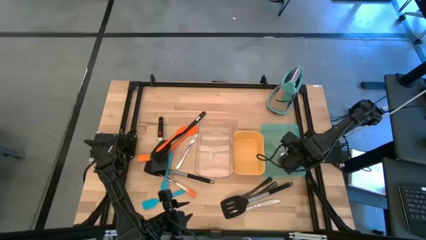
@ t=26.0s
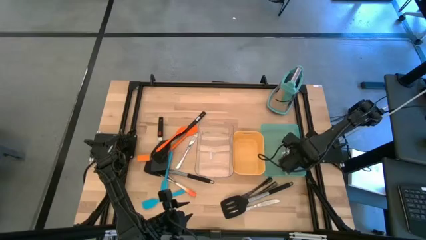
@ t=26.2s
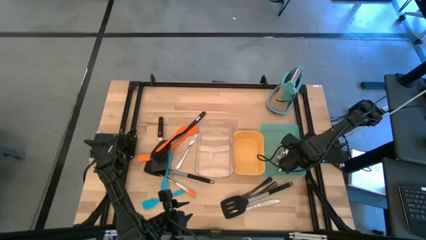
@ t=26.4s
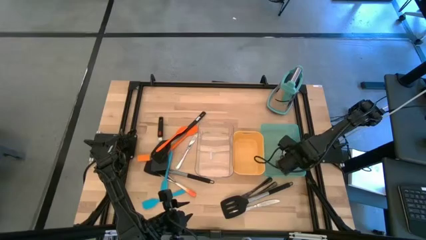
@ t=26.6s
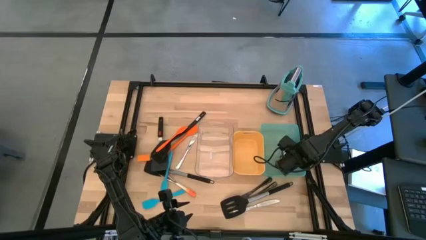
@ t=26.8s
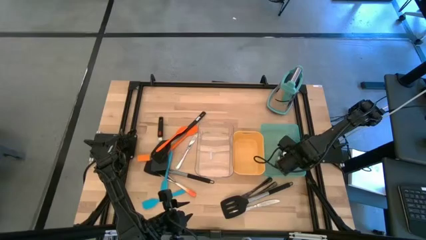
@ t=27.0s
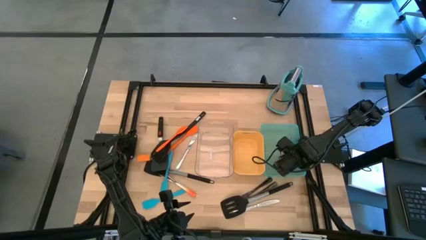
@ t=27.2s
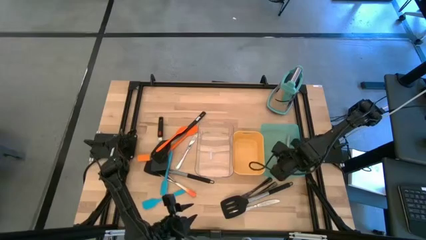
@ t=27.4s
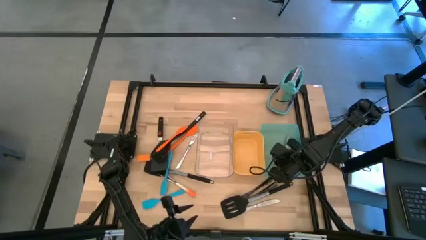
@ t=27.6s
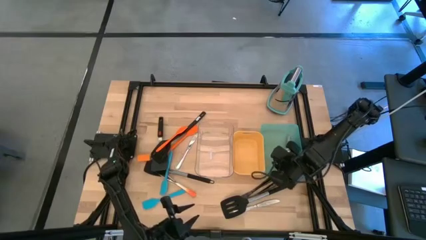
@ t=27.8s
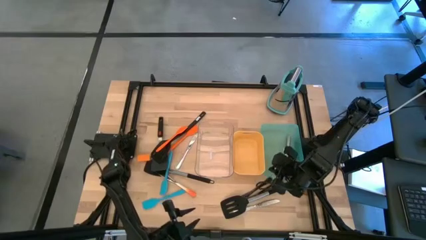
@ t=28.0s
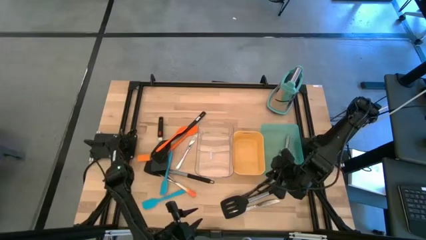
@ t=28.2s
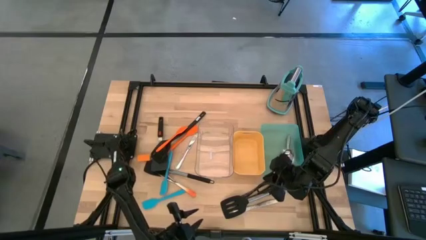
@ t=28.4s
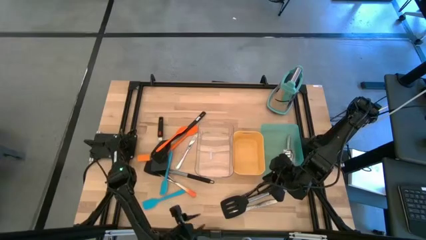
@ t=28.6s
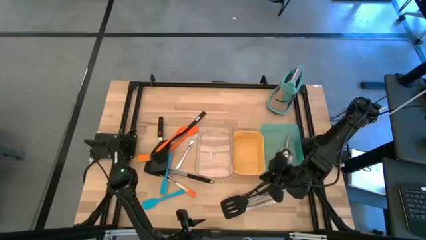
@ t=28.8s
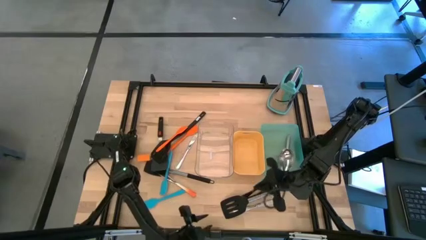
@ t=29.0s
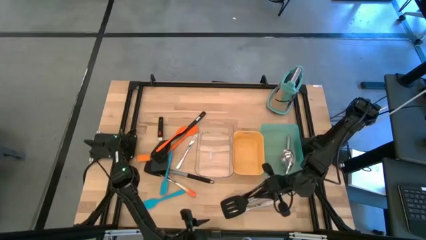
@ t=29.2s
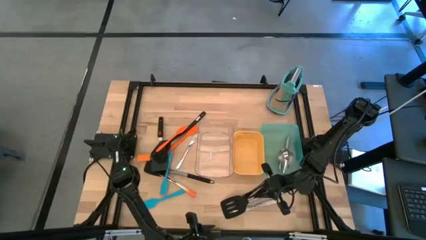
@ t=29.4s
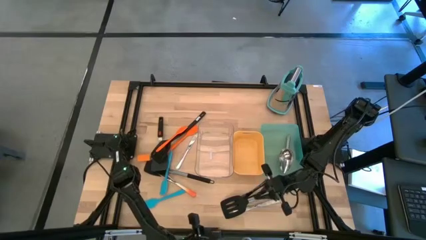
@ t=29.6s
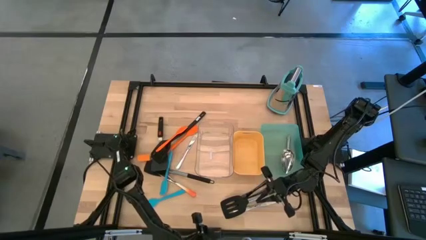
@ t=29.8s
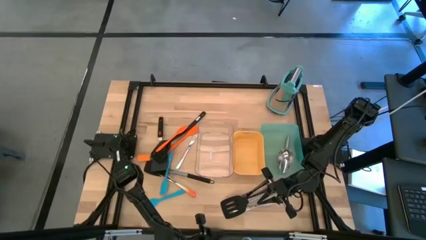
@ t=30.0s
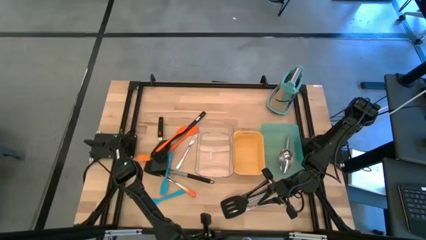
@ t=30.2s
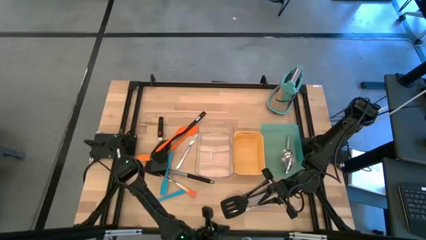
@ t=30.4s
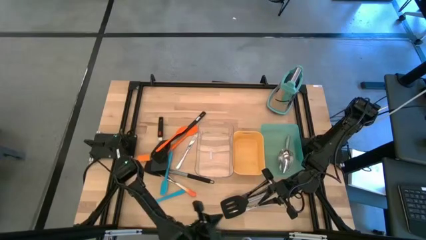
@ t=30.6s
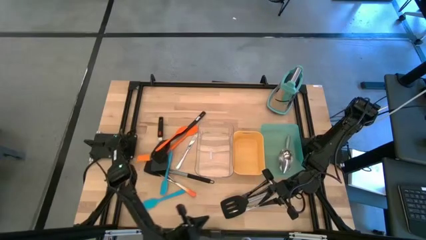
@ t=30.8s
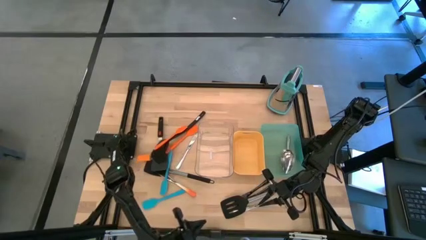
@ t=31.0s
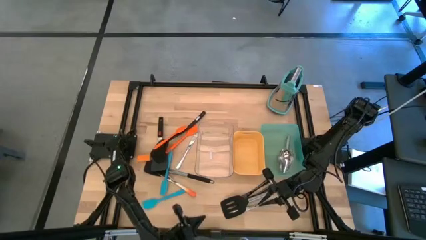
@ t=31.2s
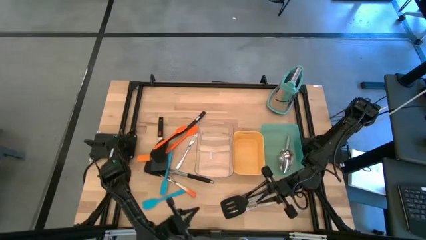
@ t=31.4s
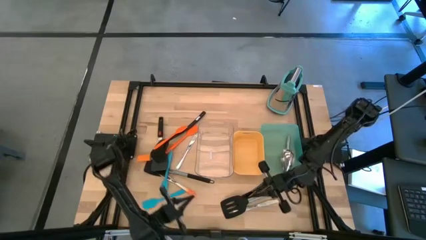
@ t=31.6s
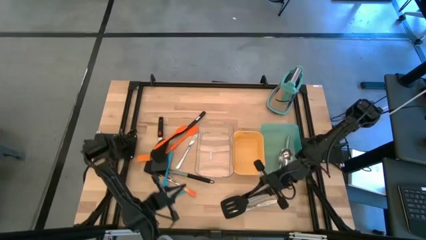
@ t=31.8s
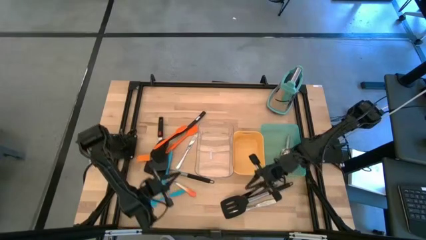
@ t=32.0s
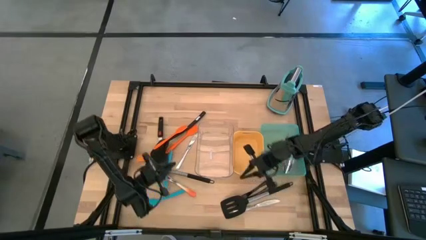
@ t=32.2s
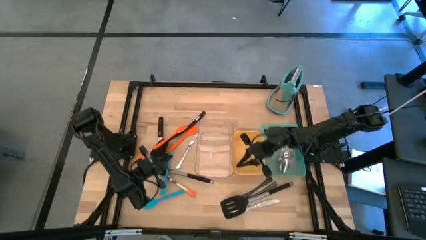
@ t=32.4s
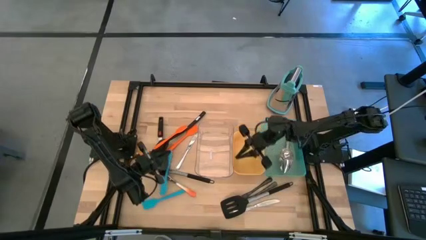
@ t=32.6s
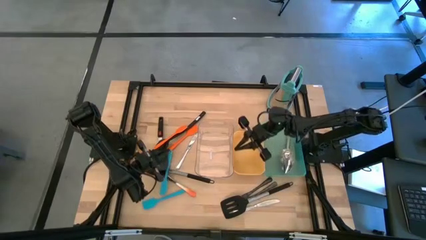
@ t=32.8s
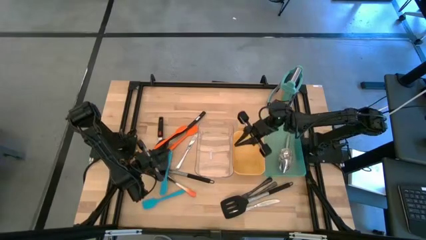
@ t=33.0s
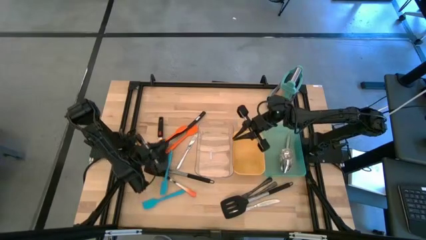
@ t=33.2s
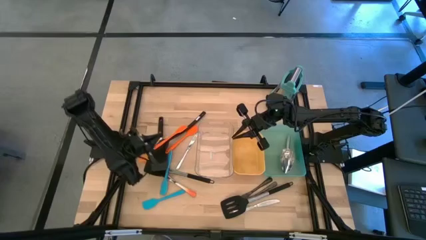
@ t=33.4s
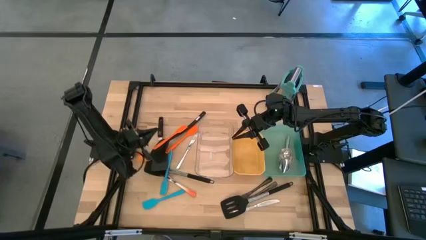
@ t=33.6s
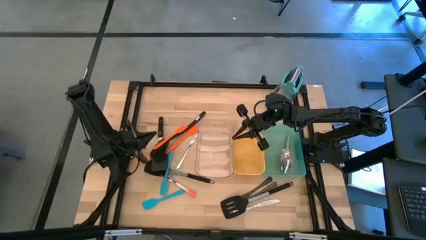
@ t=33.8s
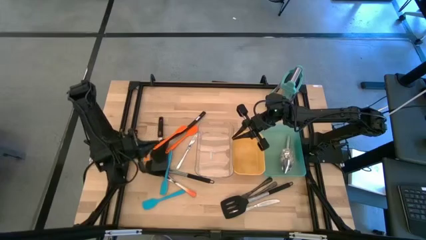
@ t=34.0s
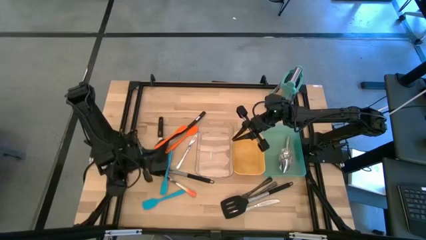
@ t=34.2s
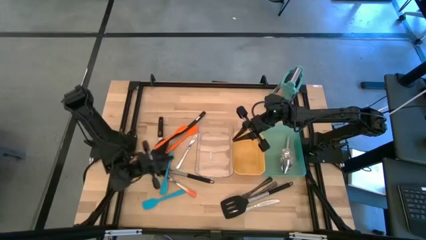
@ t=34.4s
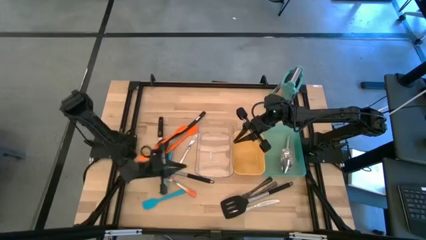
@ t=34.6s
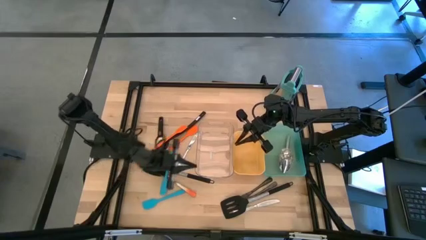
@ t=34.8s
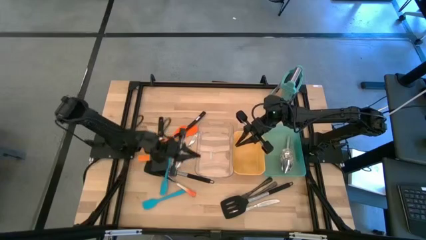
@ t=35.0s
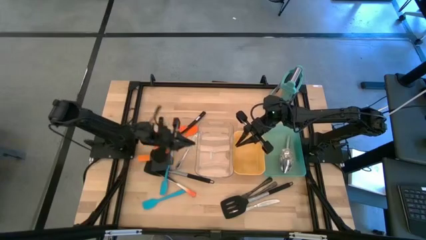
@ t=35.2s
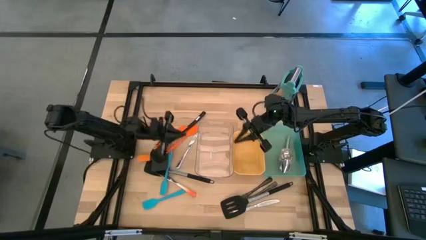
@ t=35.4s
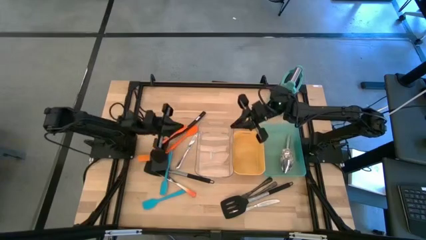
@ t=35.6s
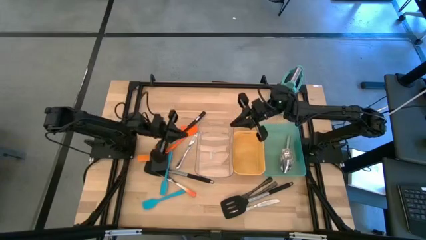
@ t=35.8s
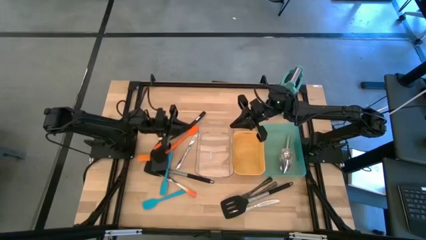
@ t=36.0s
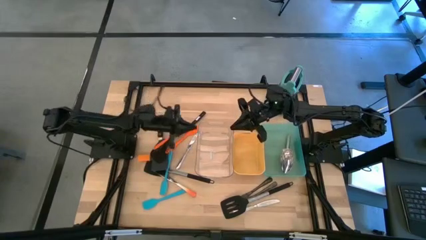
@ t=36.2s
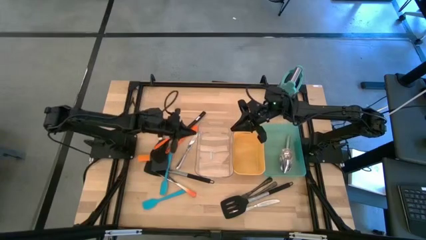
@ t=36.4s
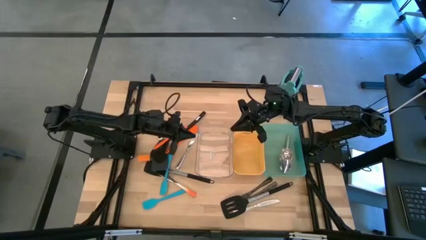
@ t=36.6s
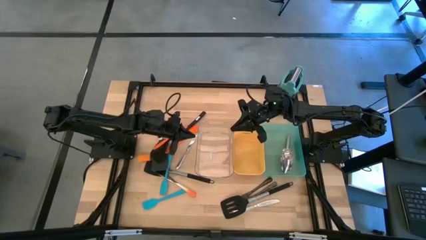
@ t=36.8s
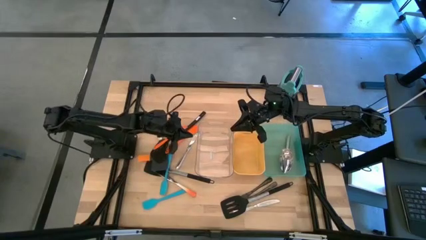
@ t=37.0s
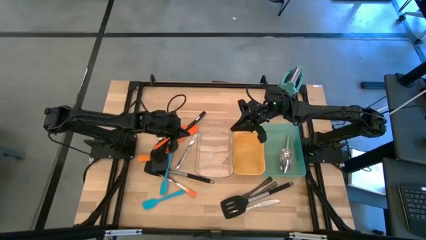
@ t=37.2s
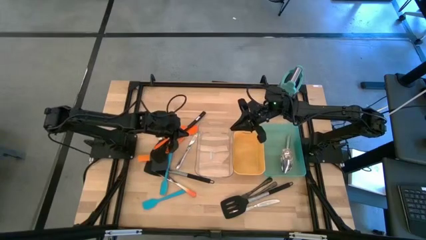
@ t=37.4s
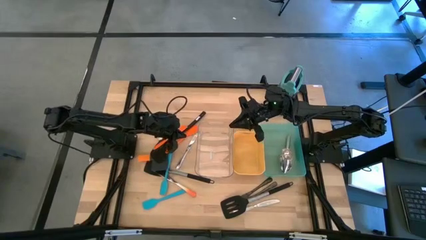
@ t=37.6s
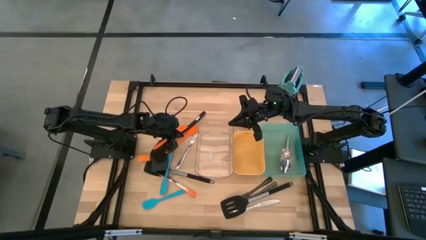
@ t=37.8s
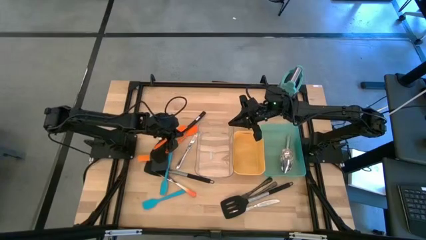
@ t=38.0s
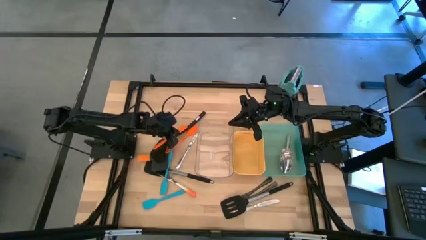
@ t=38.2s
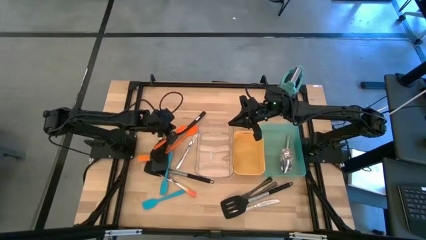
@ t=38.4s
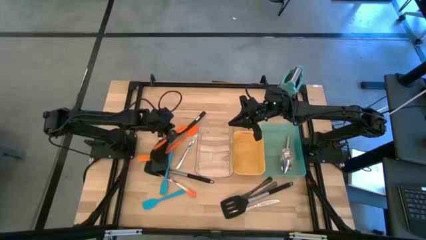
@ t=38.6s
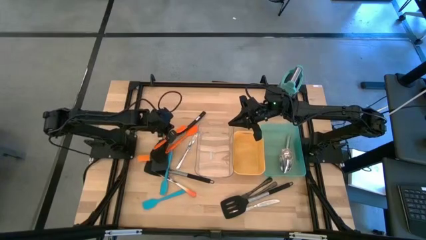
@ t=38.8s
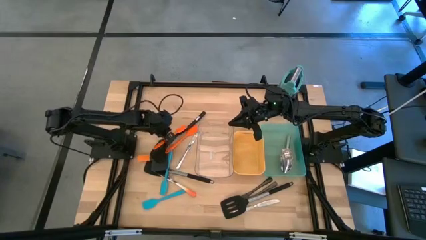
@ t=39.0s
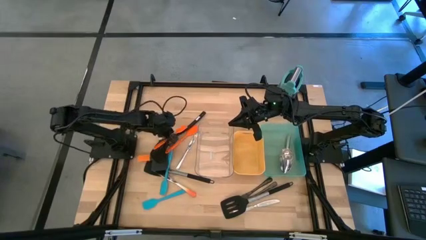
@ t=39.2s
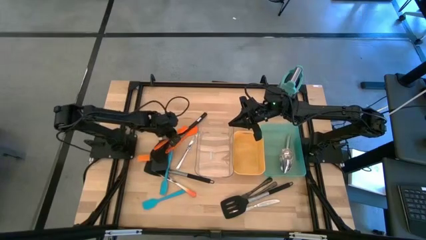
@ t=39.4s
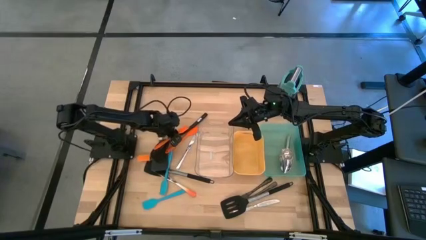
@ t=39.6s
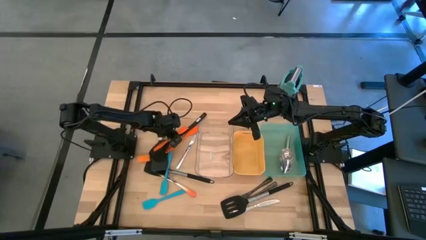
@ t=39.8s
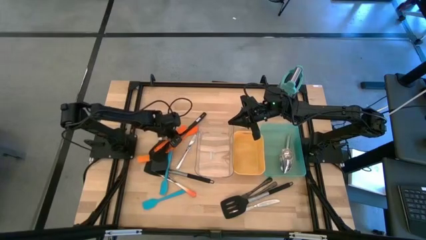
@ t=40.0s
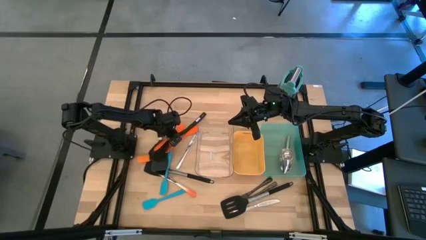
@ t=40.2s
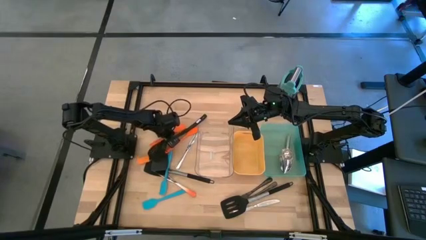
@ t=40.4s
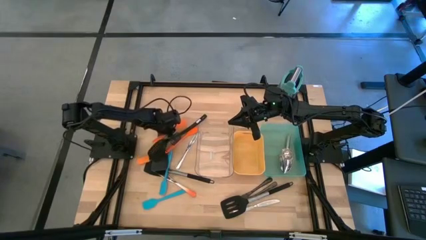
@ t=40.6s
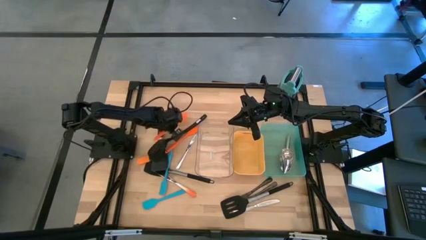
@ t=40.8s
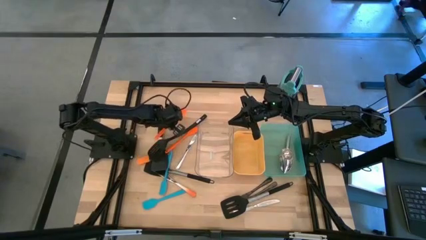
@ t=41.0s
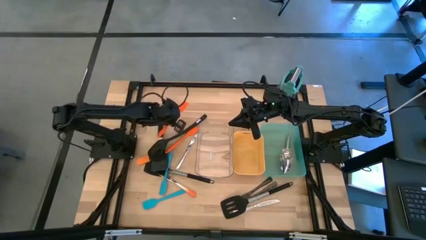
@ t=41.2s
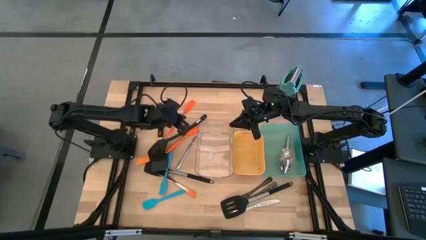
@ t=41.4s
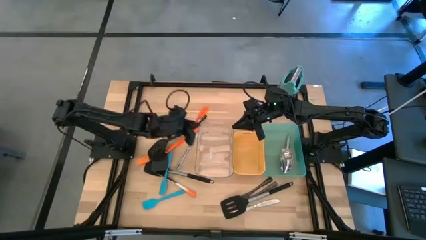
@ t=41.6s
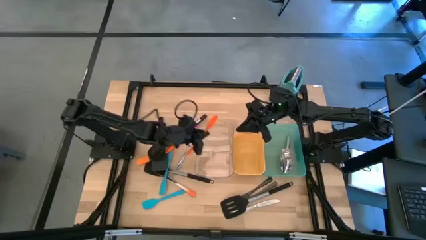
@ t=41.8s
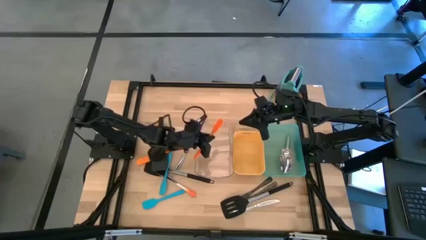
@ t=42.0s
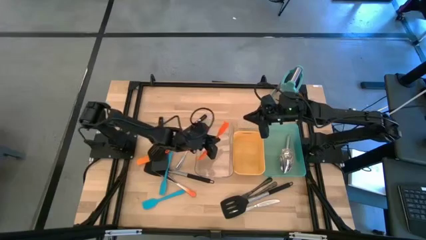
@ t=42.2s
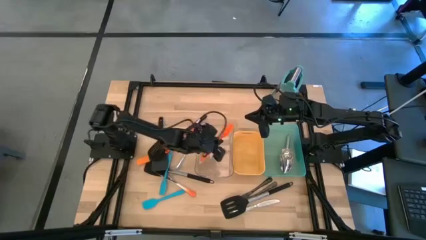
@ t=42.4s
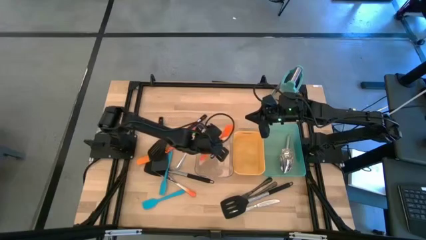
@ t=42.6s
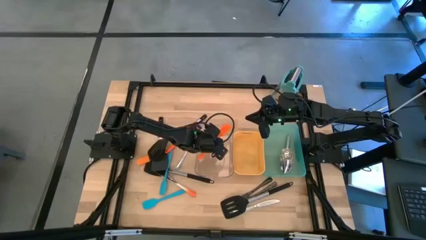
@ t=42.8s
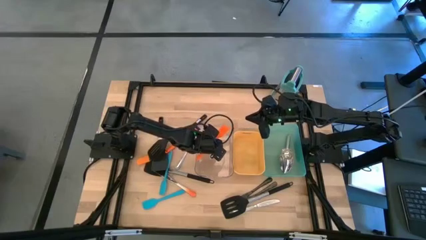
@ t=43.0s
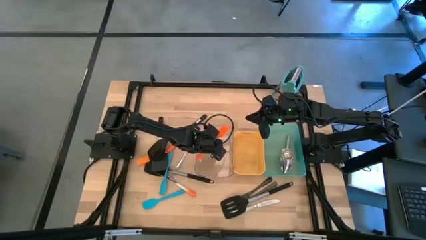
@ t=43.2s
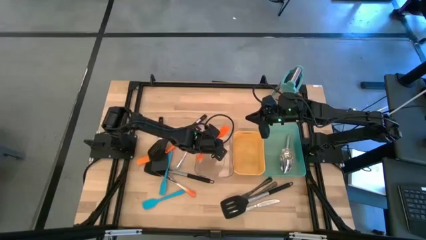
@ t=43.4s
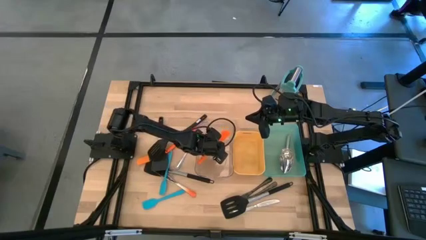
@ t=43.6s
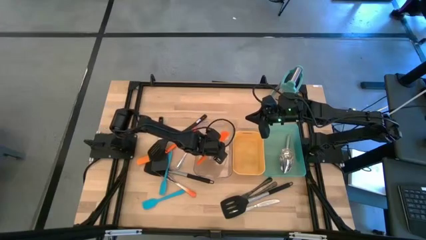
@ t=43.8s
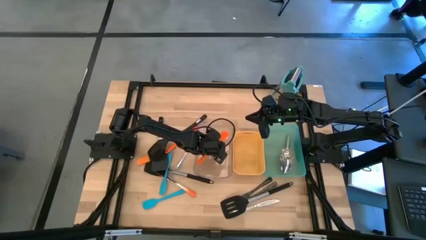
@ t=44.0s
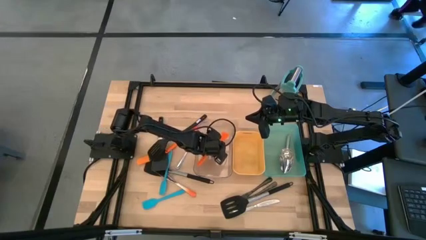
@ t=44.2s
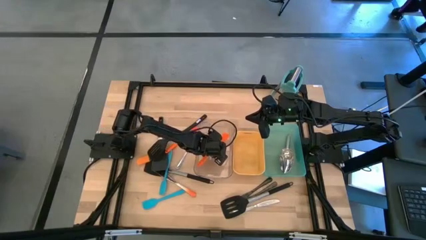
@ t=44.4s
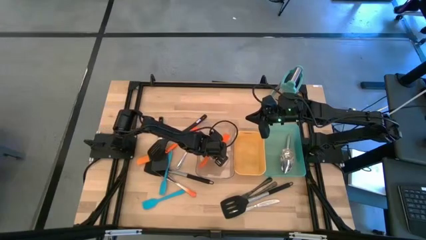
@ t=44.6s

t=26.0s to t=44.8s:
Task: Pick & Place Kitchen Items
Put the orange spatula into the transparent bin
